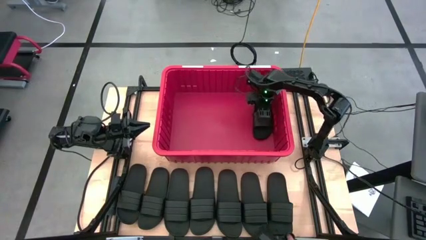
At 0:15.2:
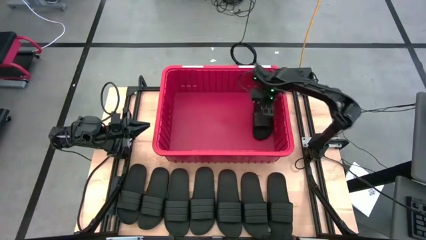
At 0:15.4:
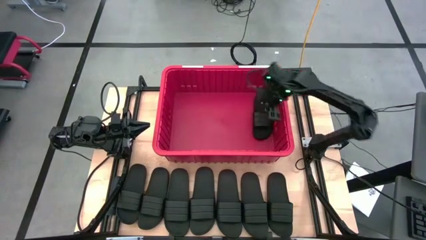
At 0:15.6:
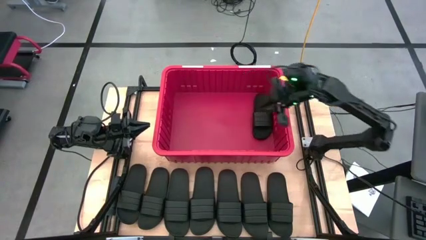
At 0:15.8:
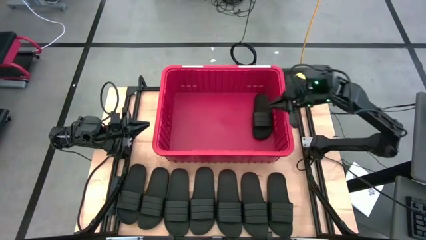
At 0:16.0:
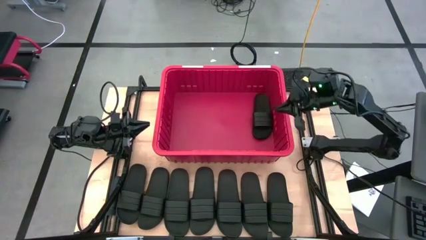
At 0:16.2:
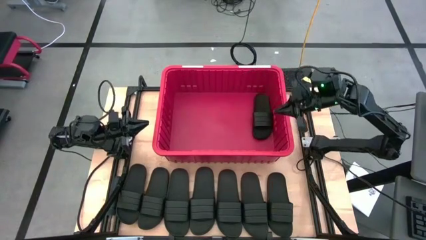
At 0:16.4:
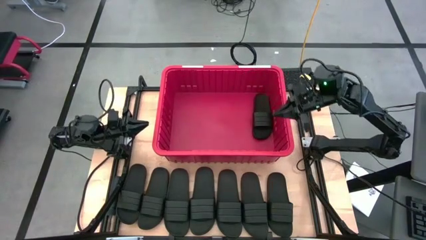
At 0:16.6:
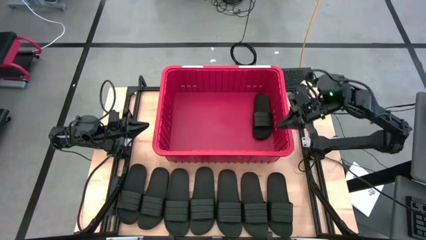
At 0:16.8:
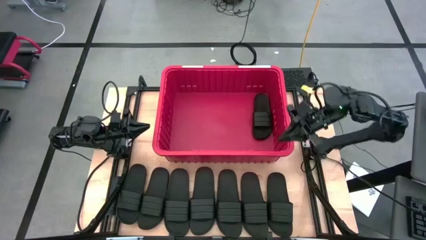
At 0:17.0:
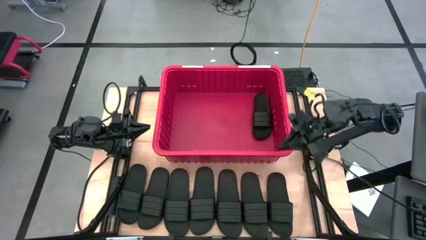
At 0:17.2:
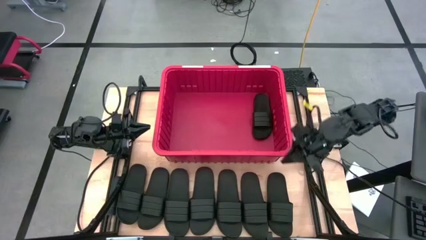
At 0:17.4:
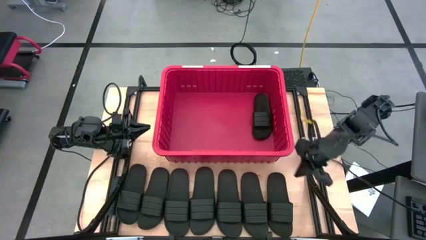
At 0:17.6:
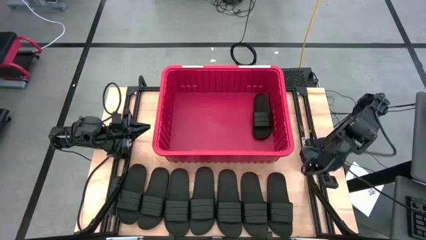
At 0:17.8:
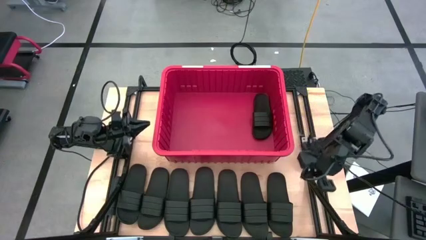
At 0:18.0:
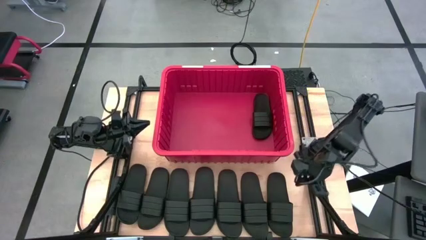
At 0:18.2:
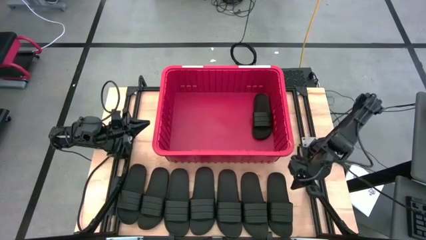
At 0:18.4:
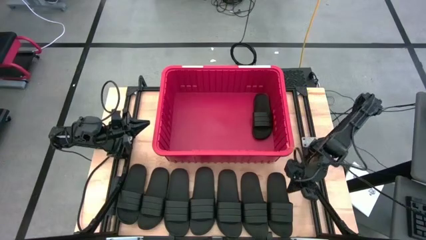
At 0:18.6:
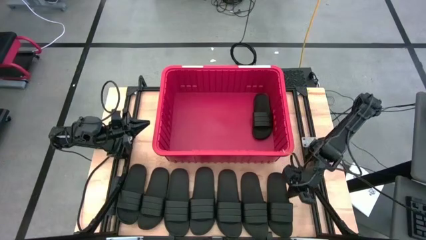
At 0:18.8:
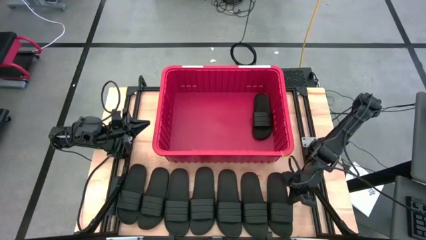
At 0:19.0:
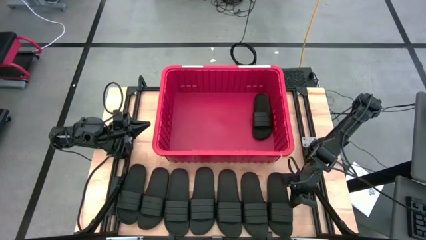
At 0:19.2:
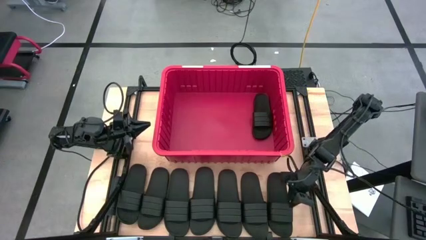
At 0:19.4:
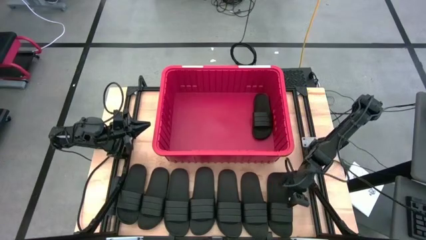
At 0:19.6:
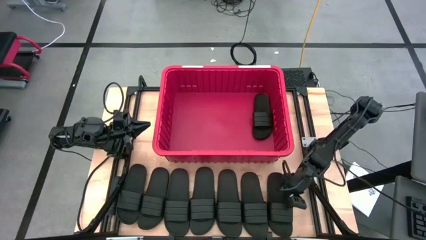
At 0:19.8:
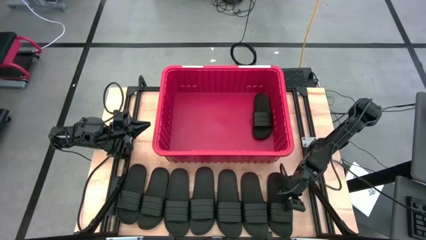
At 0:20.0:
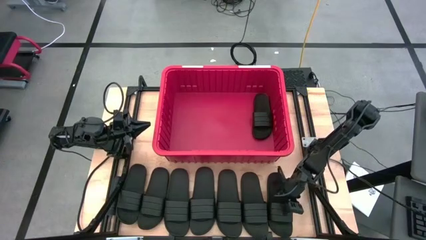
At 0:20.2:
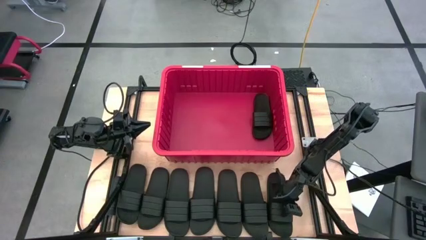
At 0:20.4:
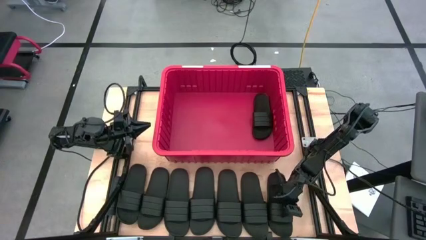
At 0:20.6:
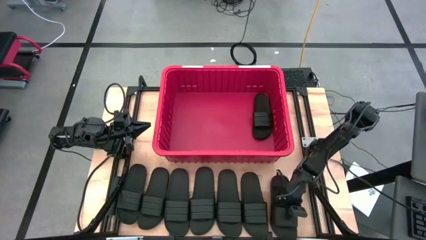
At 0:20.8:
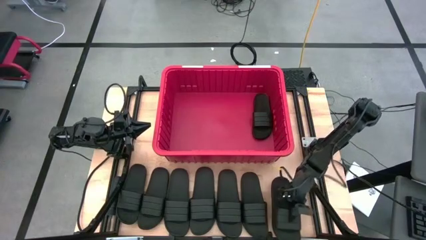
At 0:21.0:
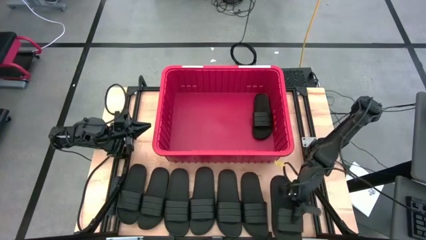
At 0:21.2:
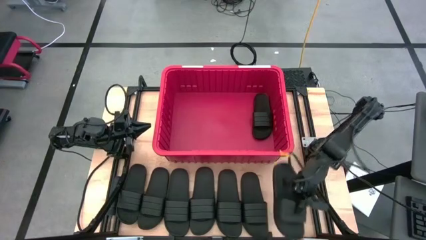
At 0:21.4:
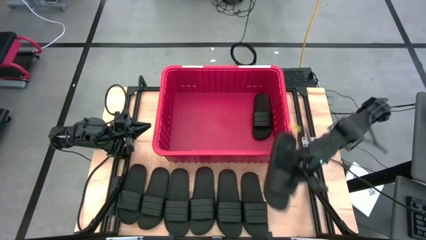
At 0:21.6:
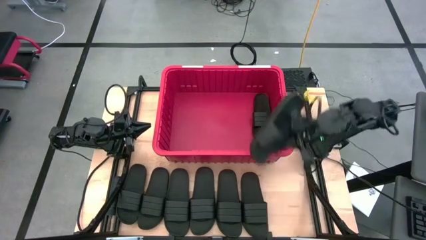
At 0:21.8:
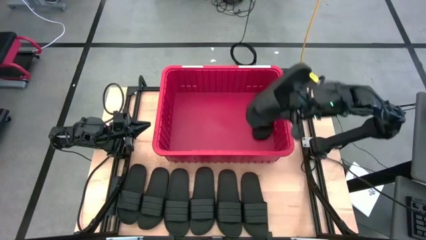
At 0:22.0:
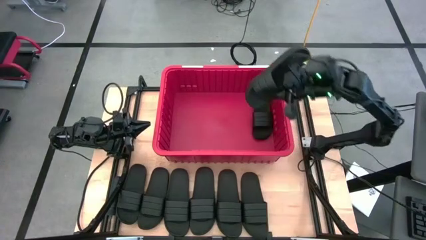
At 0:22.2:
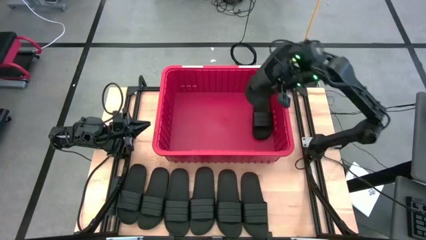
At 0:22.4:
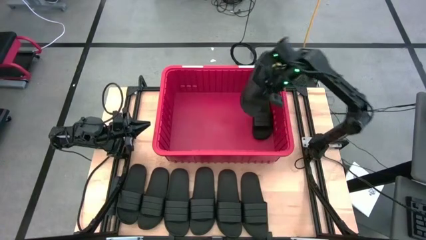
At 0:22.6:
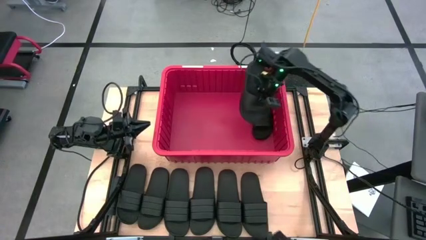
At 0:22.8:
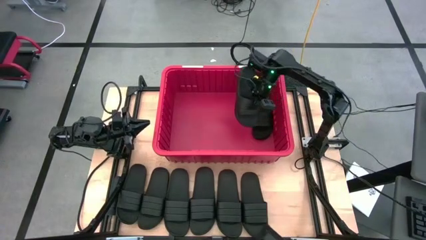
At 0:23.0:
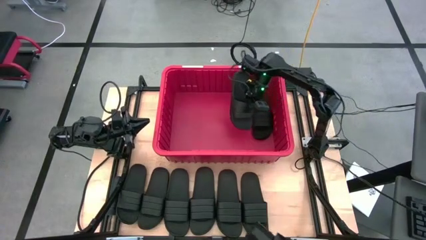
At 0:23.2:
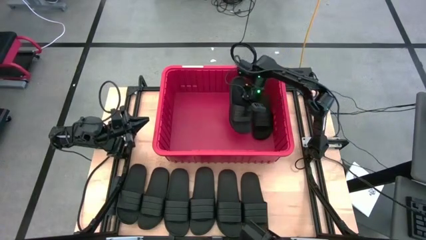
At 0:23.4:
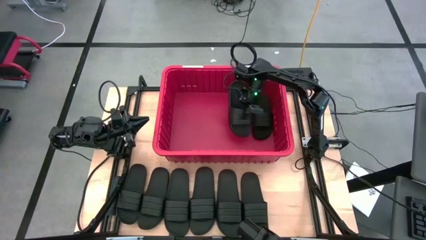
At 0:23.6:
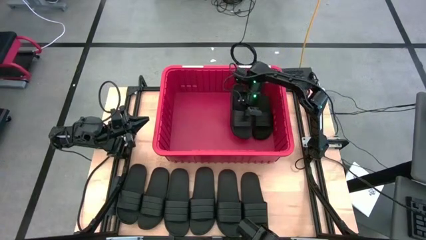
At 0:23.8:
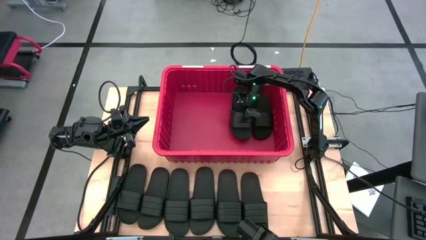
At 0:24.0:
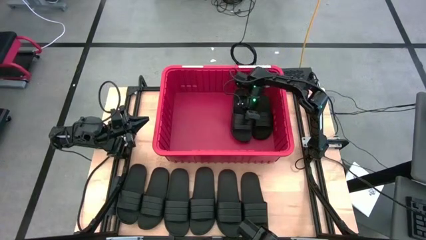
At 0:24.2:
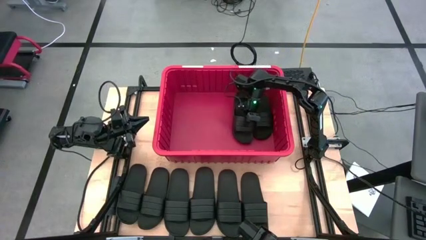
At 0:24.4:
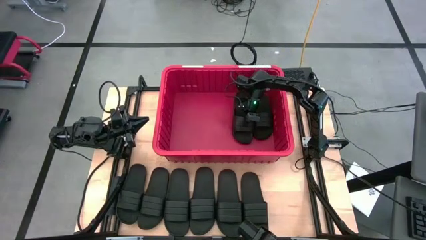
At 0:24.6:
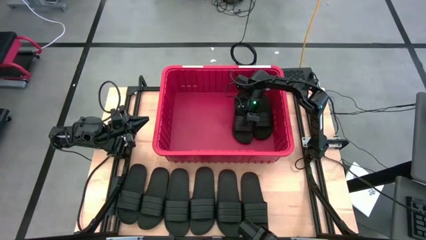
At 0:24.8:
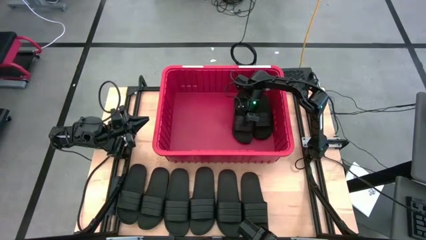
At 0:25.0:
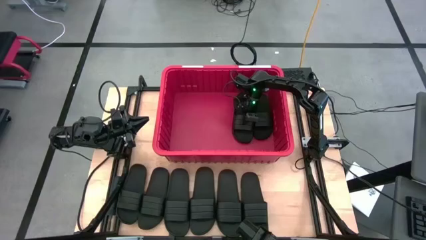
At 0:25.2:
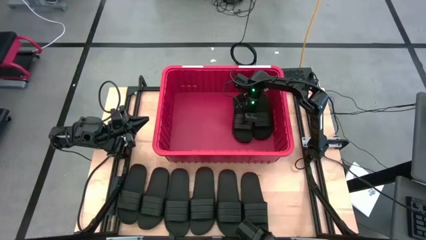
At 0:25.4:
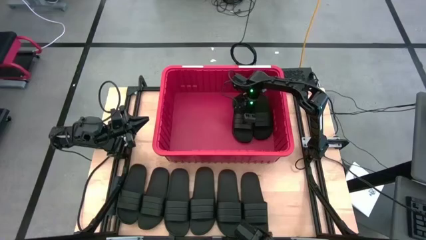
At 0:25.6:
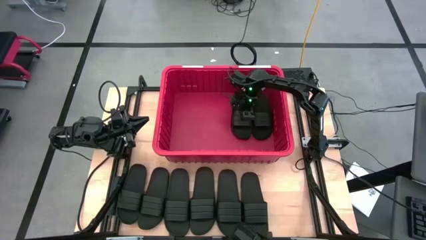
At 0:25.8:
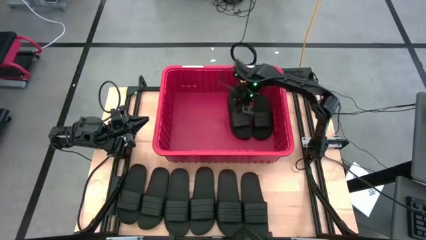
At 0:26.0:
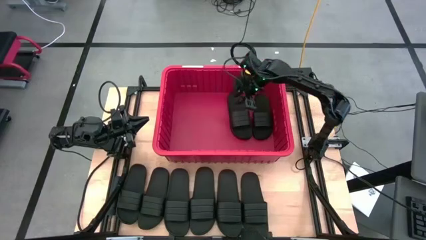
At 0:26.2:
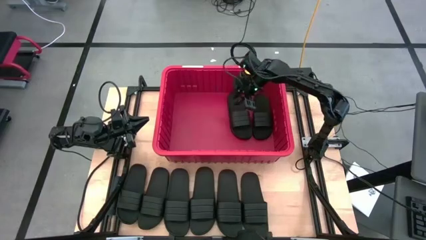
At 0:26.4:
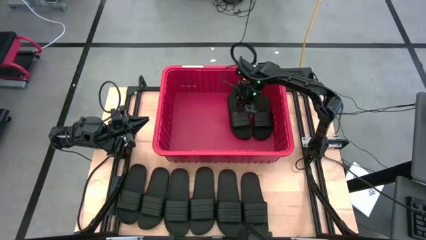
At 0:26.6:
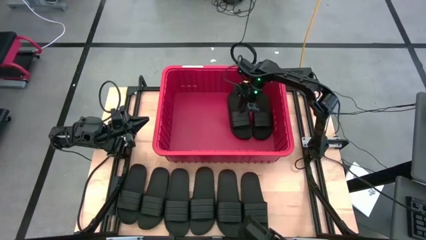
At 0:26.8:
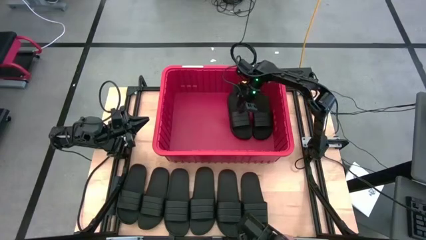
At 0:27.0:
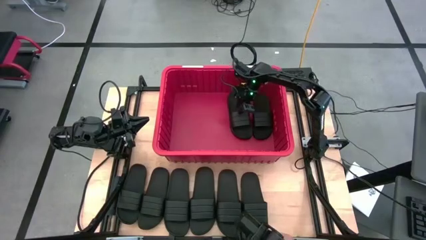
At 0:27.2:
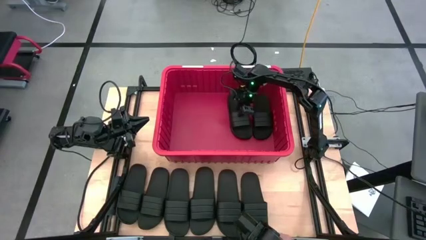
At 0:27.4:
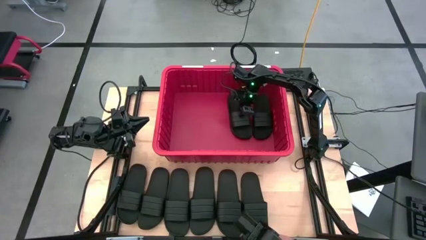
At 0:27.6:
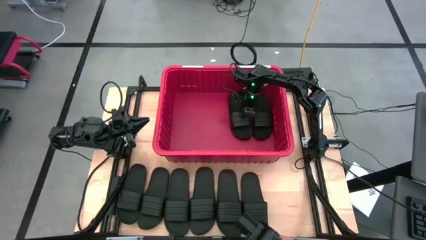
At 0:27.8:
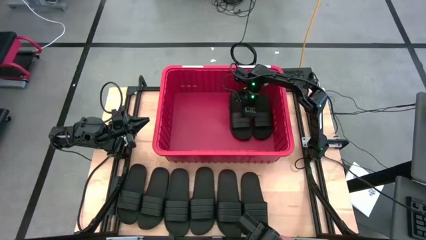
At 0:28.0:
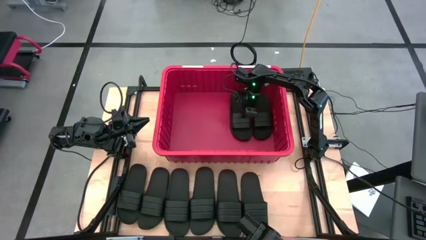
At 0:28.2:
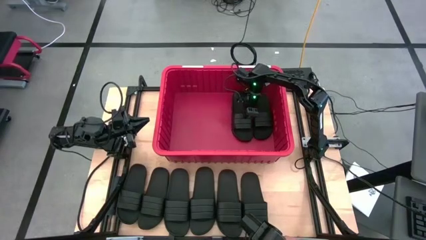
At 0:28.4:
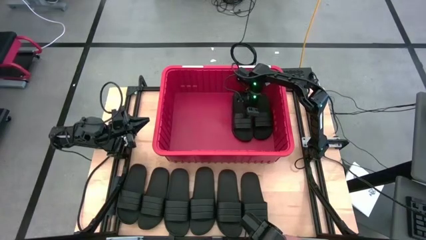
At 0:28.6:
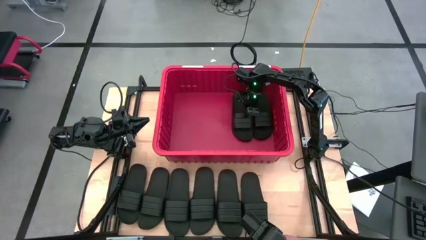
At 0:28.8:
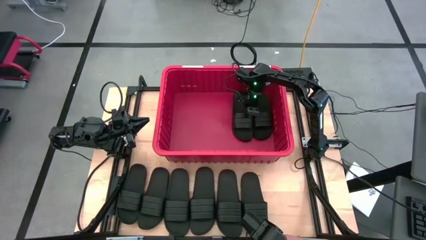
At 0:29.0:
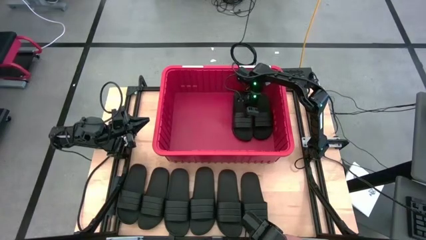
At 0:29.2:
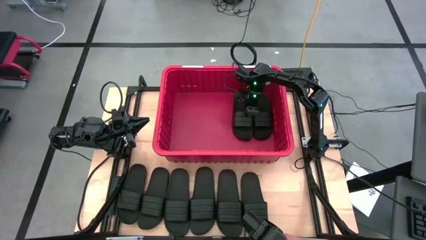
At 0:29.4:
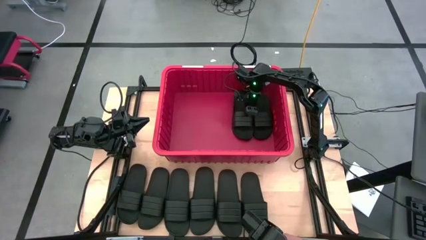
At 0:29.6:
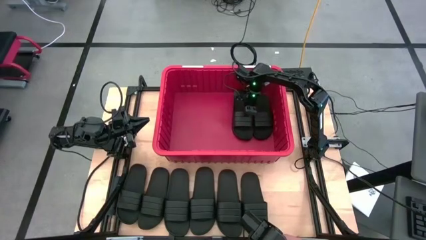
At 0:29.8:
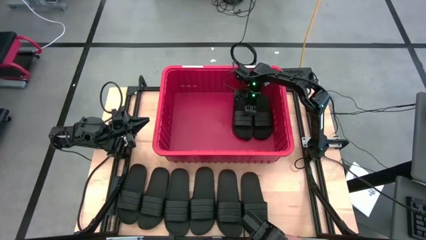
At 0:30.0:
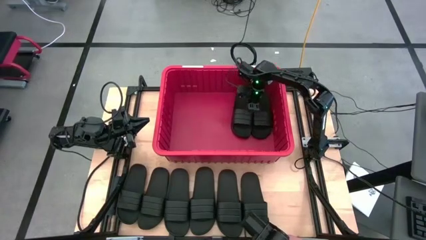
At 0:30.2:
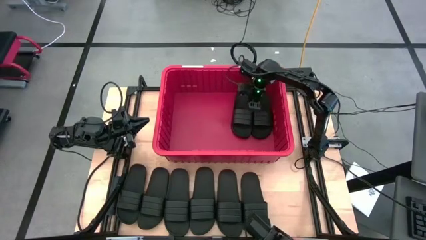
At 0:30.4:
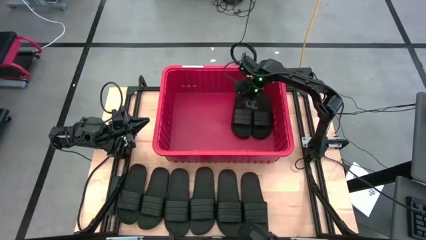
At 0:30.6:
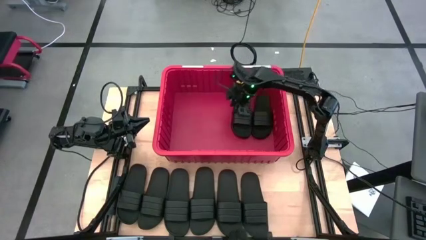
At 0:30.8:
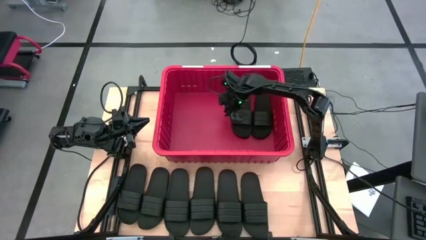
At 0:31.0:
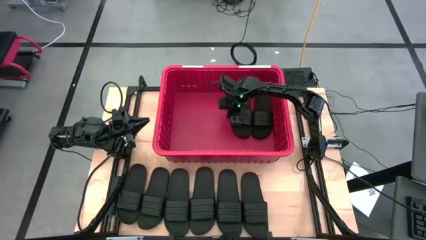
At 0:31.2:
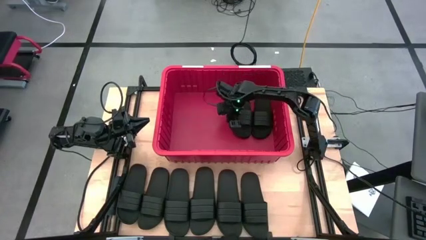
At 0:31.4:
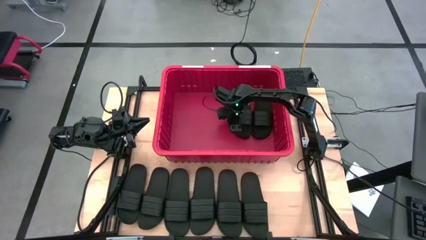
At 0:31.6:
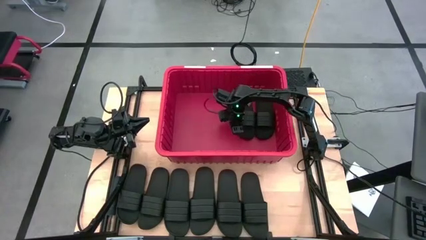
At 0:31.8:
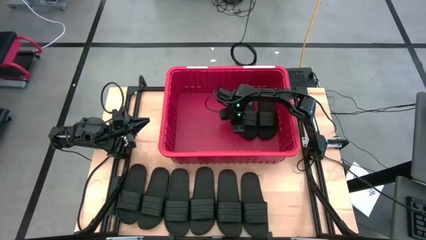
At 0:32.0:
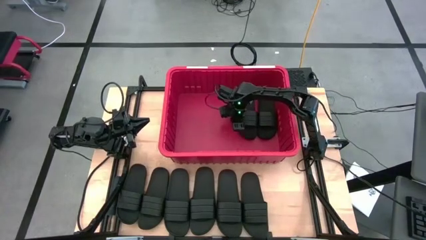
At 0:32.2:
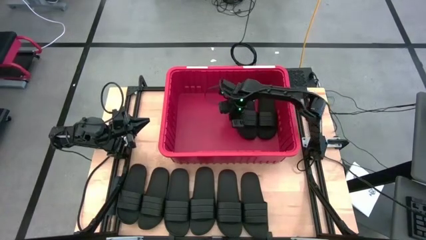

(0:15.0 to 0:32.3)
Task: Pick and place slides into bin
Put the black slides into the red bin
